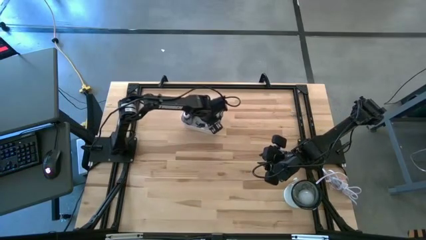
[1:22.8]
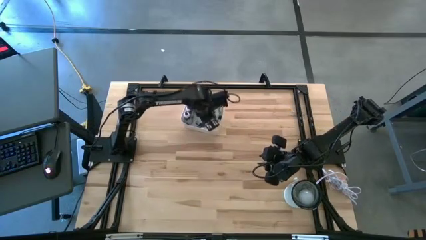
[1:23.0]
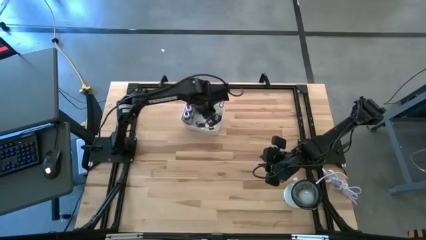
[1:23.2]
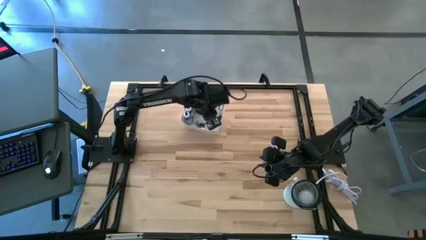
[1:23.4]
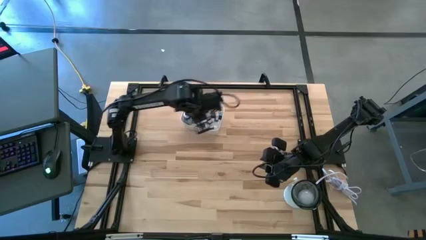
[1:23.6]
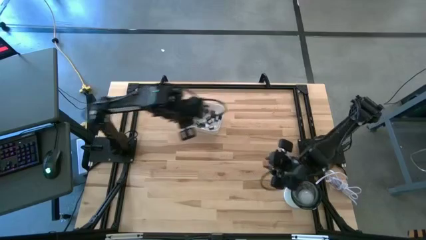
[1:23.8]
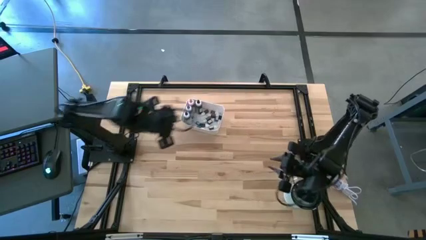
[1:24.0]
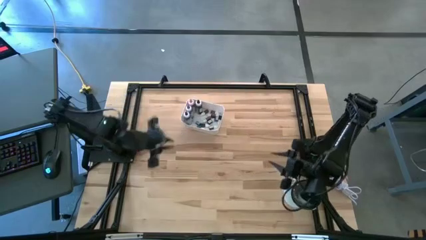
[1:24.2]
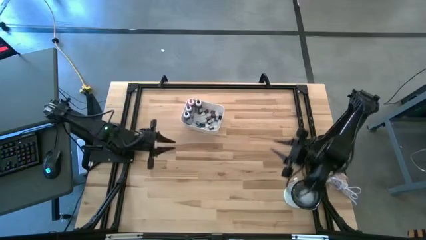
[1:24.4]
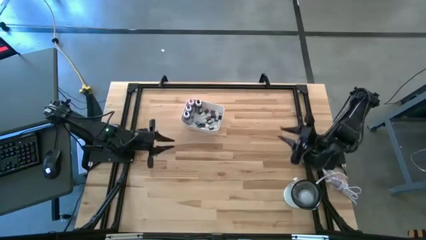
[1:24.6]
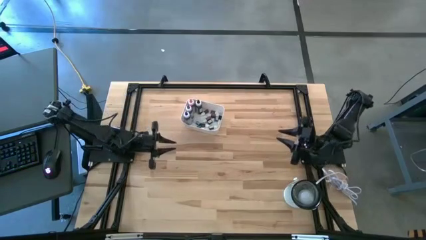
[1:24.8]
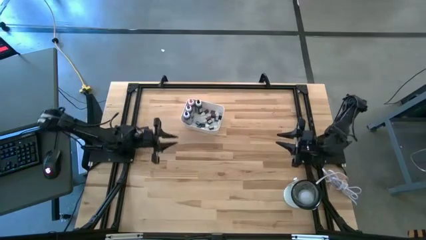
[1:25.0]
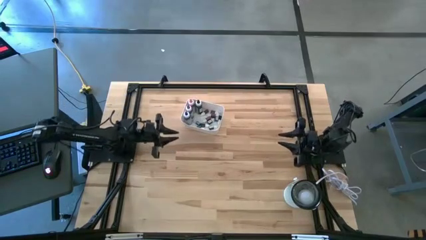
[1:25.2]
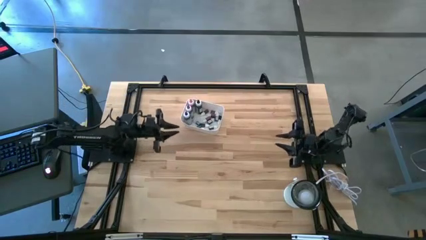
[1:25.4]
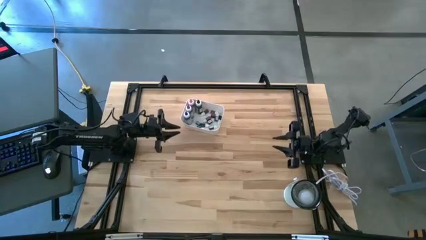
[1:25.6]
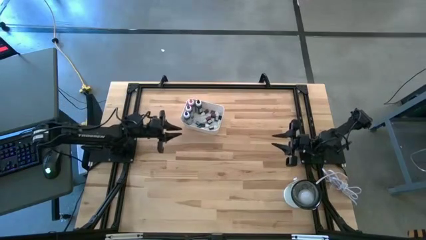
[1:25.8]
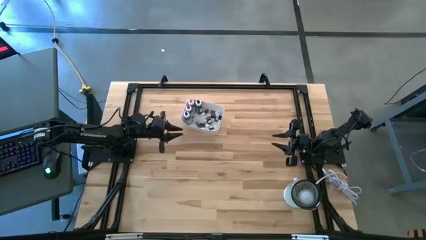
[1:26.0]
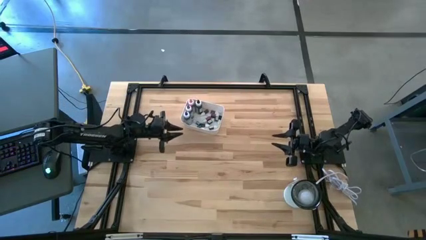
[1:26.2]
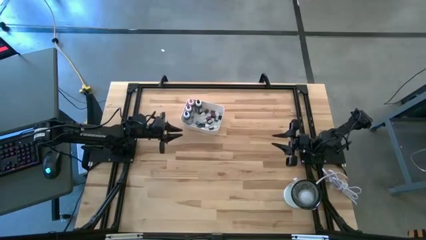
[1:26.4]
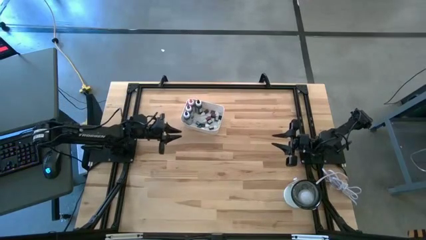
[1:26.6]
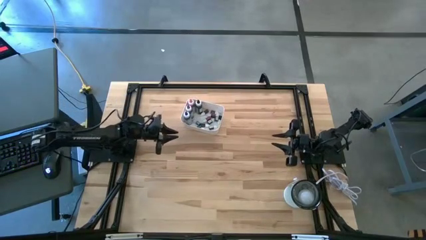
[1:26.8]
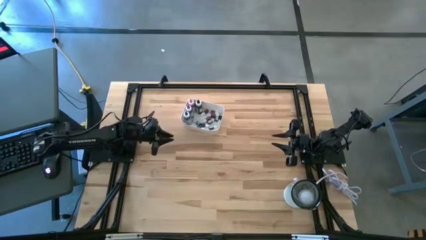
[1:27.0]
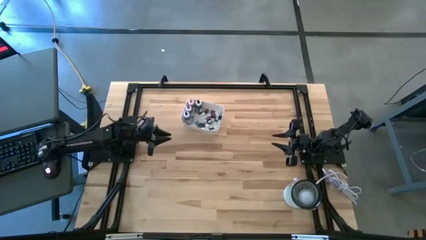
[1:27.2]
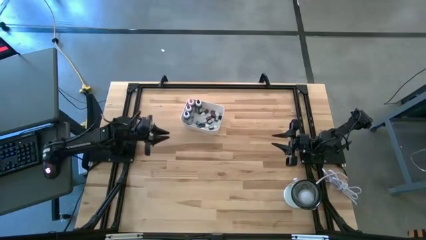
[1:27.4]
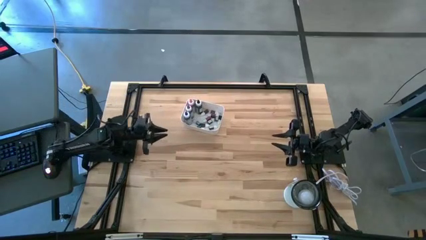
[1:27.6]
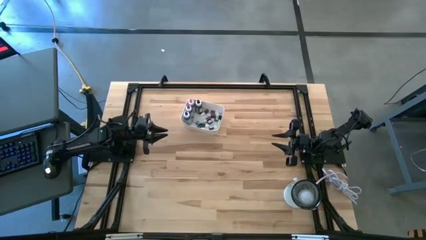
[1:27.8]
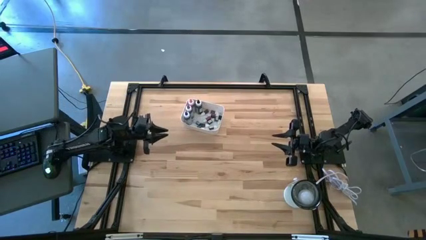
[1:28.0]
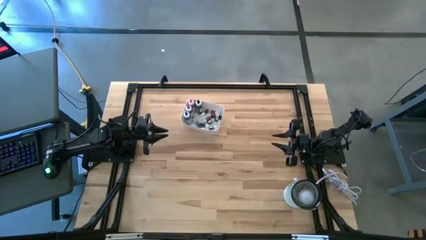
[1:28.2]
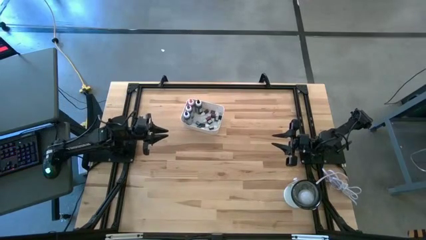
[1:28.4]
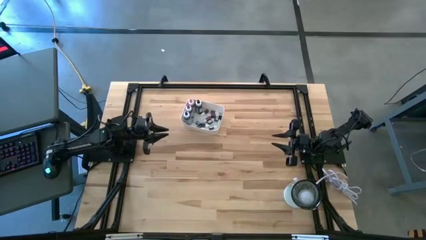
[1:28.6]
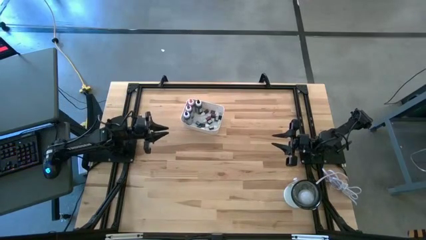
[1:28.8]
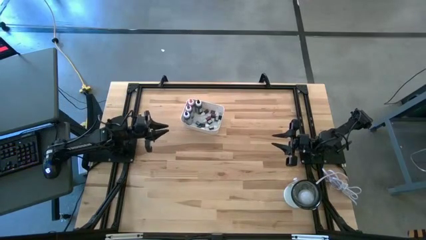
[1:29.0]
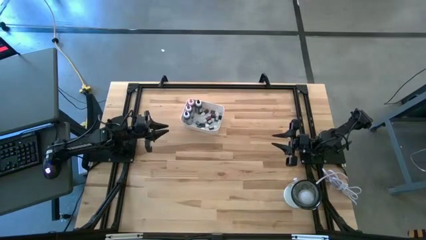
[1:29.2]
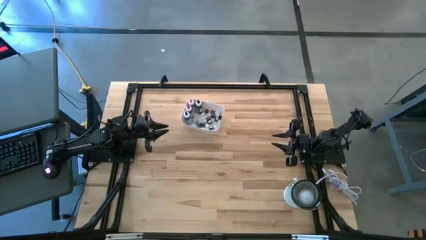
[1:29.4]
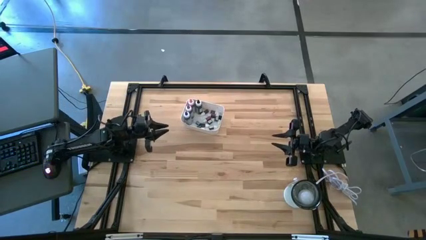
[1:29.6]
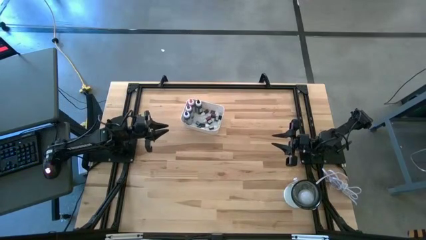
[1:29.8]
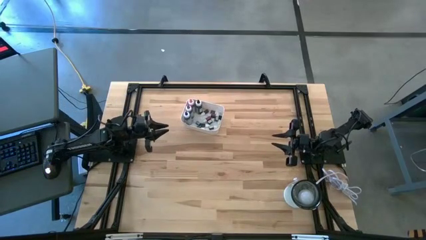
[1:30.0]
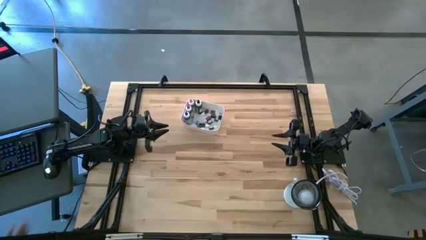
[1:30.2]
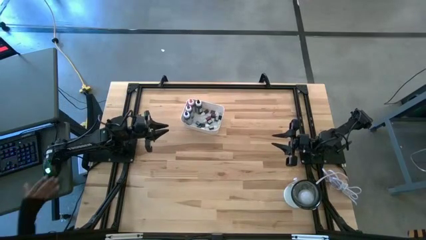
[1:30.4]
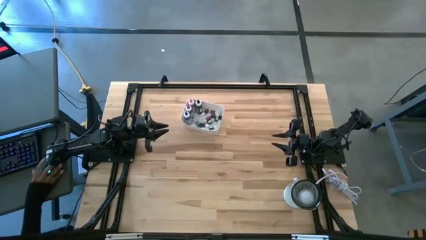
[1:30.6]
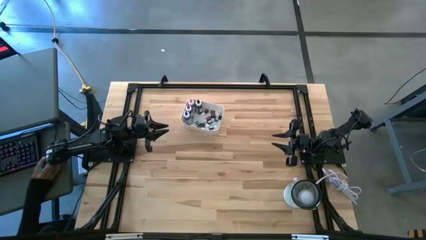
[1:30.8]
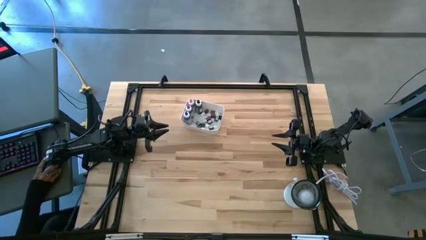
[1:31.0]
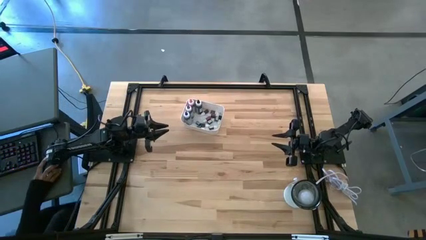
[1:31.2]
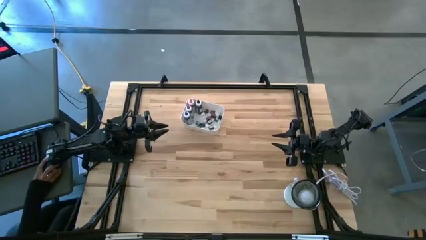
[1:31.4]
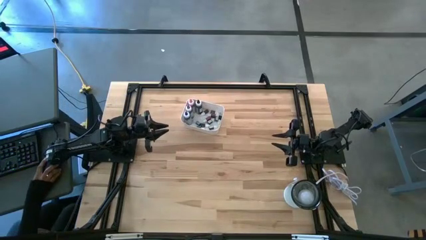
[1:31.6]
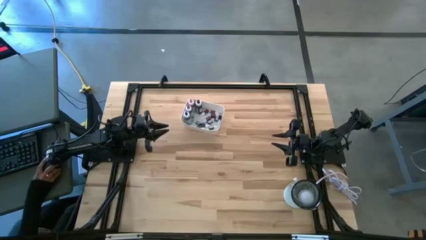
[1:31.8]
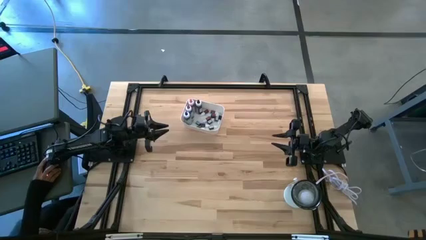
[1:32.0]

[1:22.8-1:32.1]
Task: Pick & Place food coloring
Return to Home Position

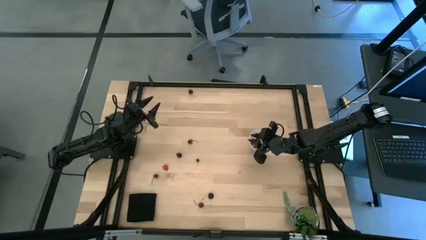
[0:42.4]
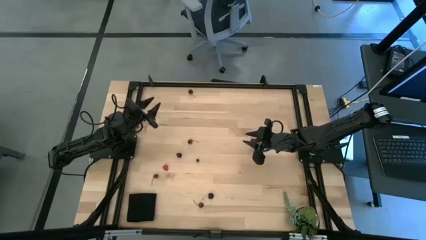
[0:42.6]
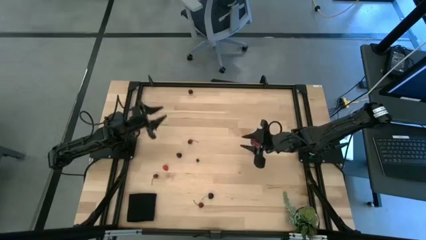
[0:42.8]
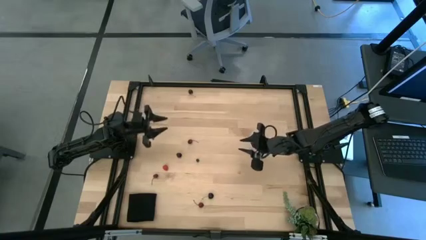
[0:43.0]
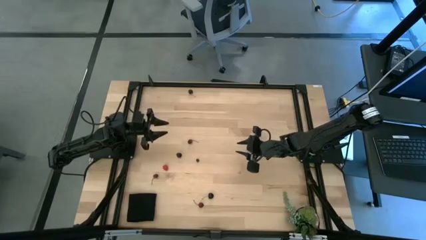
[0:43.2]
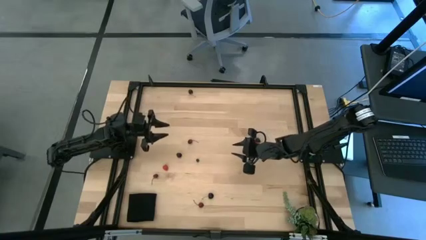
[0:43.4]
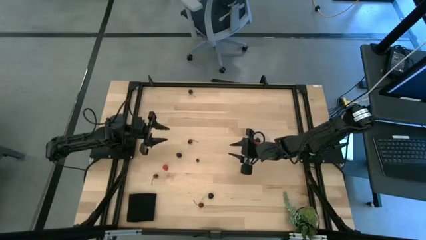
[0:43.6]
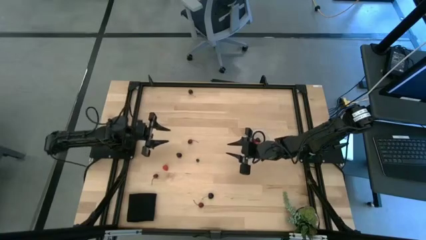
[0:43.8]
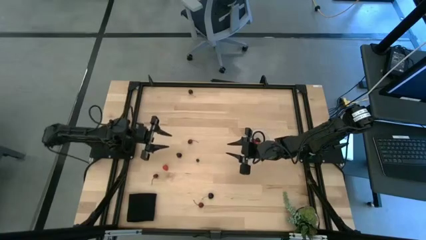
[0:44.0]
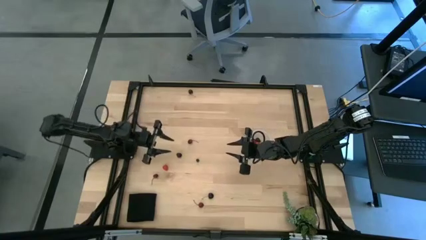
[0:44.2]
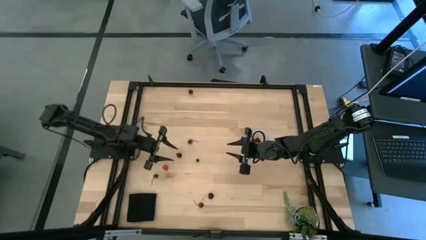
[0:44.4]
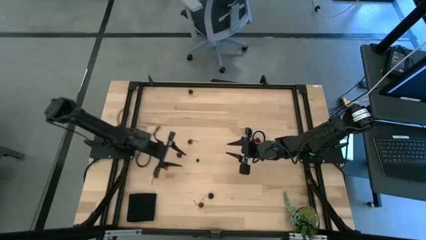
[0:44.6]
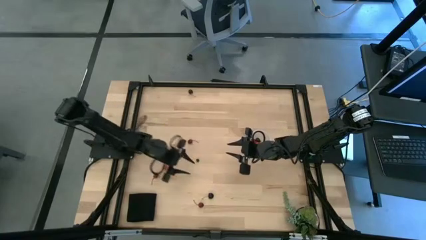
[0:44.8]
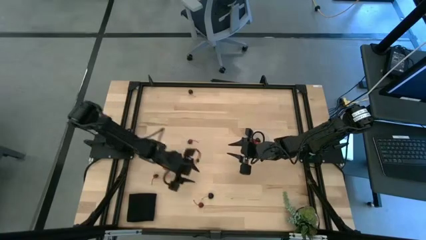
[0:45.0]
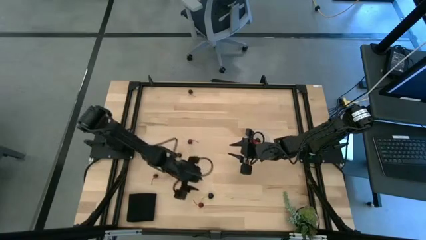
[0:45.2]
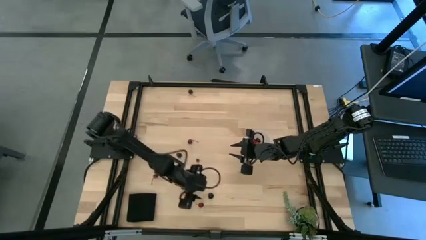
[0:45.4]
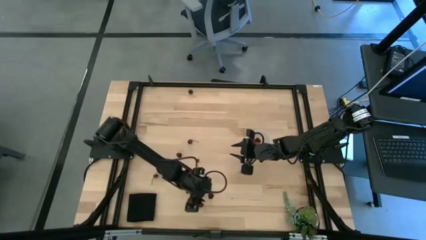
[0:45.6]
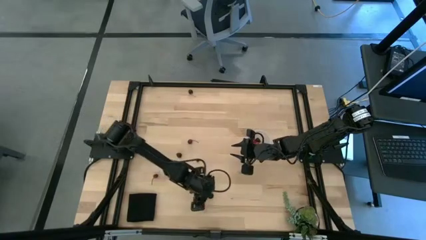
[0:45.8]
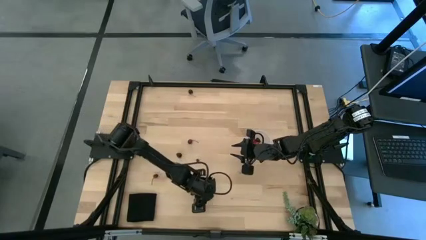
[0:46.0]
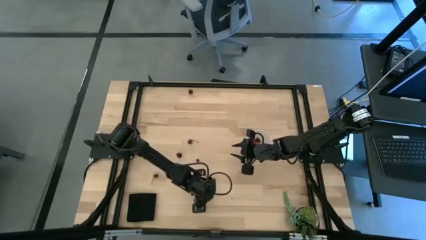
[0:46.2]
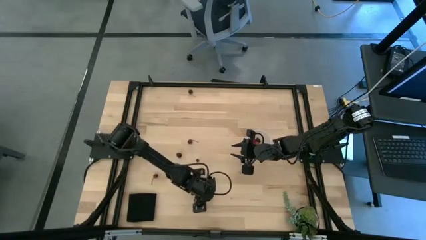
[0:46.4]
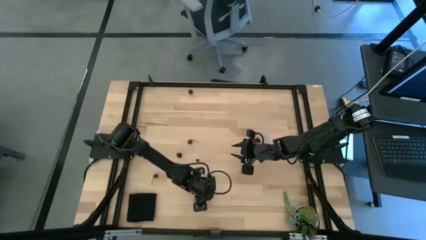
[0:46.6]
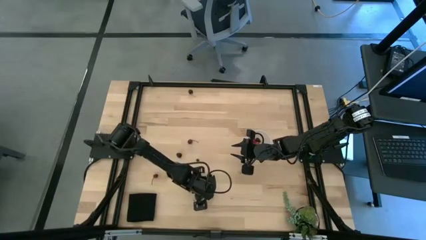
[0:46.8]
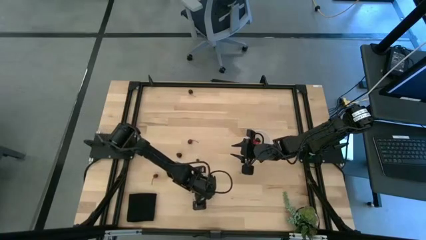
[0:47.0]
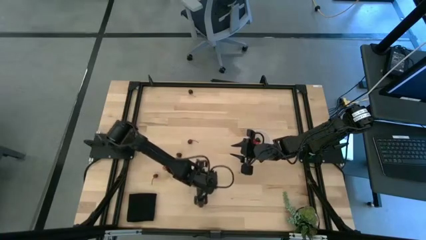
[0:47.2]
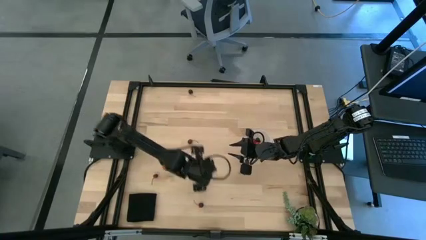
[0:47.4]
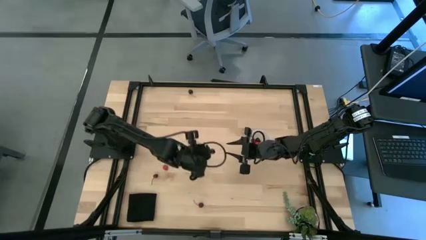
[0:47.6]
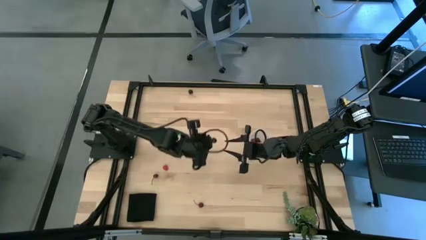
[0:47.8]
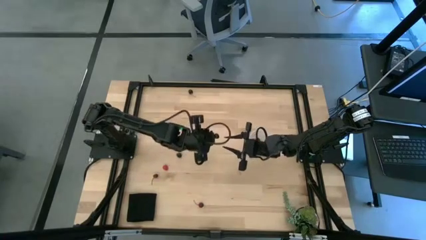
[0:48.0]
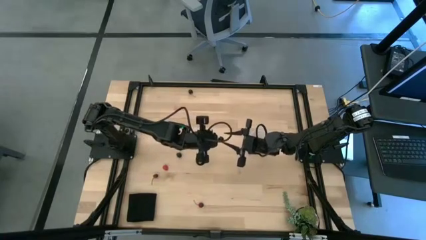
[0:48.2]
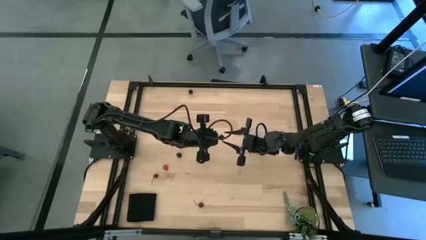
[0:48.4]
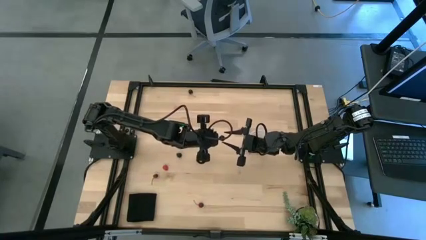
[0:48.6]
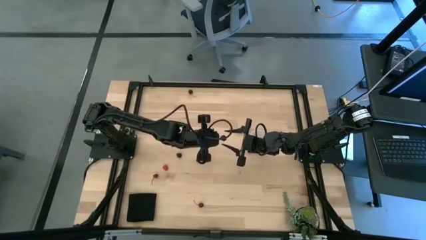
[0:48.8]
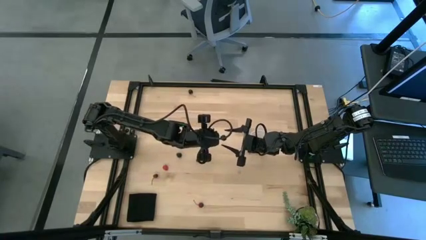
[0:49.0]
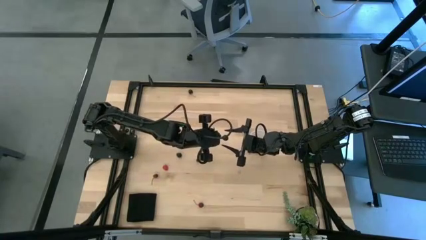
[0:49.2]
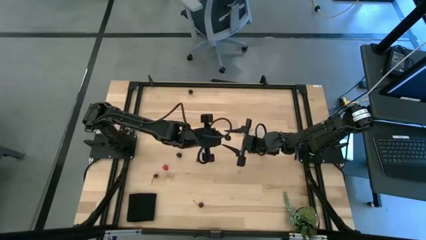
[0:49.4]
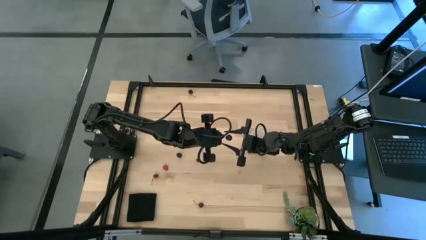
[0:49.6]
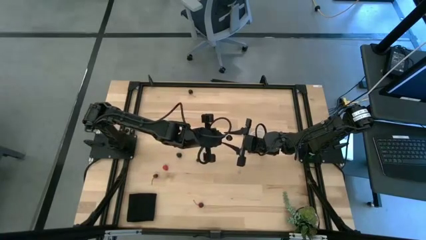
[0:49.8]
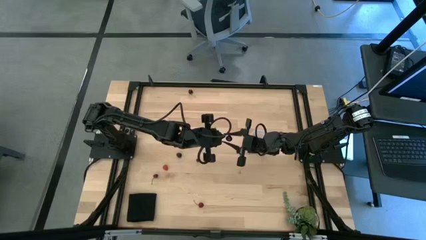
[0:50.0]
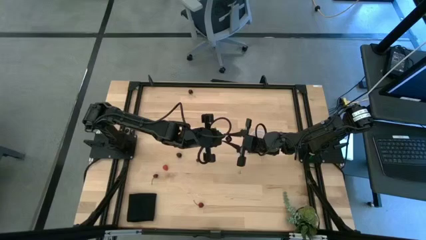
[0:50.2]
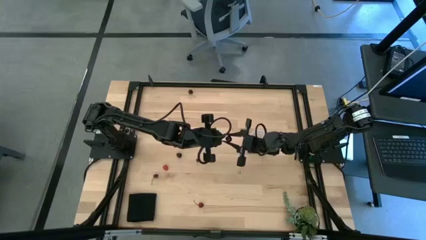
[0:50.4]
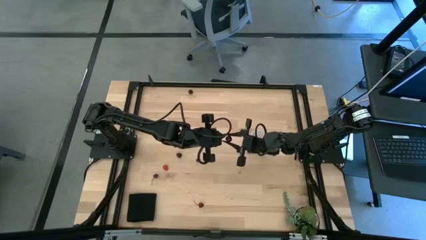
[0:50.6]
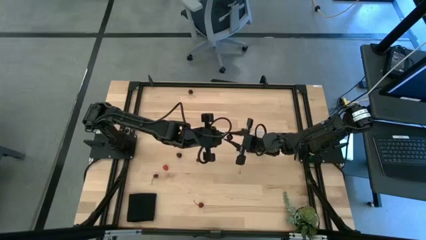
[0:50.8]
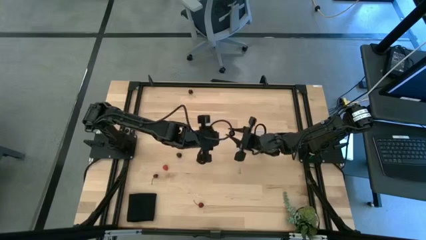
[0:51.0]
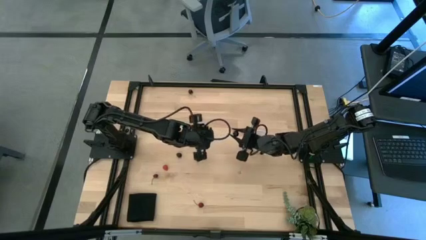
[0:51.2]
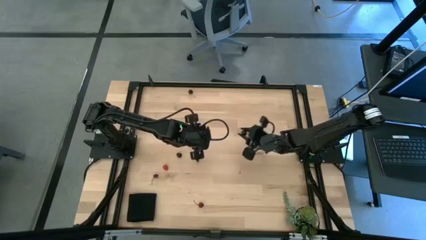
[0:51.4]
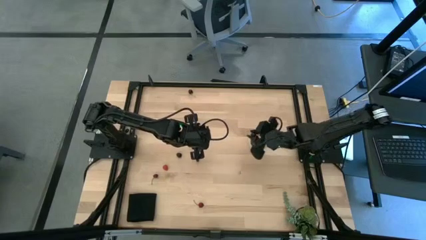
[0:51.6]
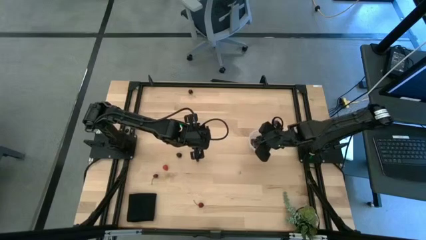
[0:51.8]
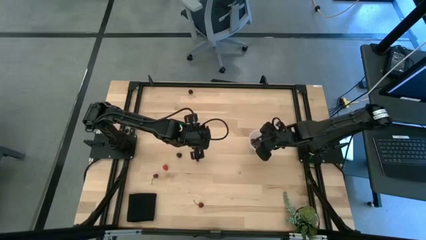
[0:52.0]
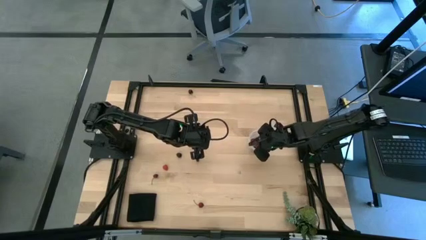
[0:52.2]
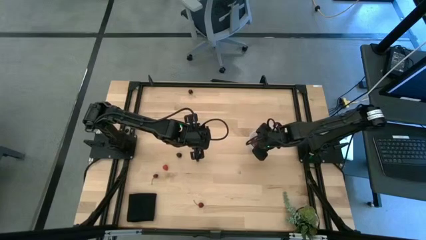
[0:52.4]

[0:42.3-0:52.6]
Task: Pick and placing Produce into tupperware
Put the black cherry into the transparent bucket
